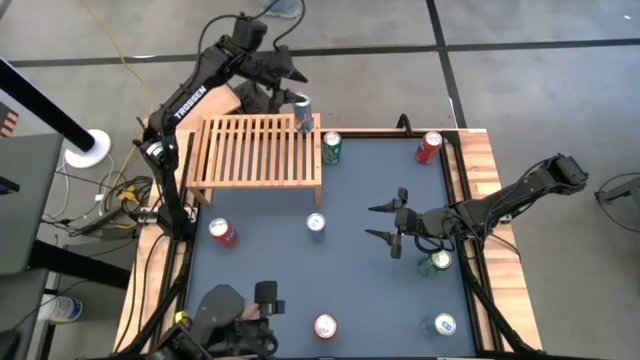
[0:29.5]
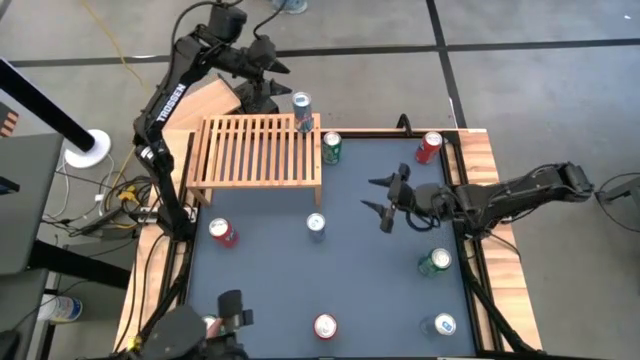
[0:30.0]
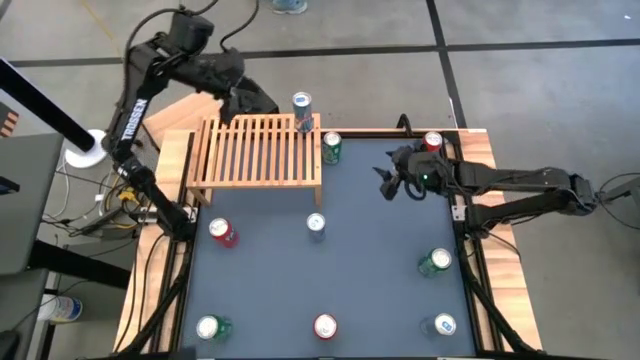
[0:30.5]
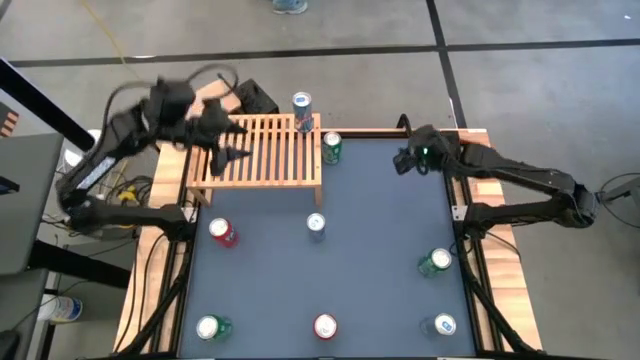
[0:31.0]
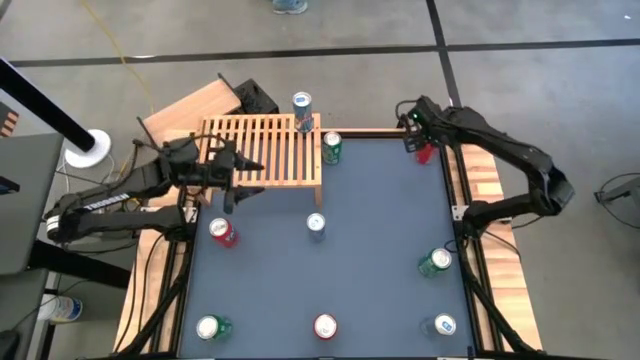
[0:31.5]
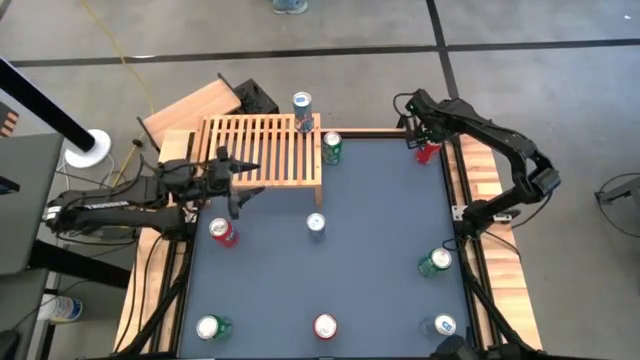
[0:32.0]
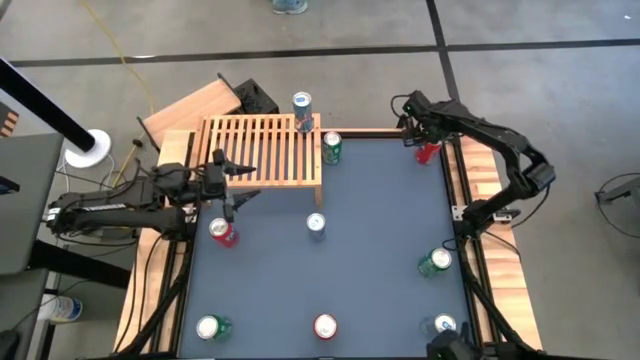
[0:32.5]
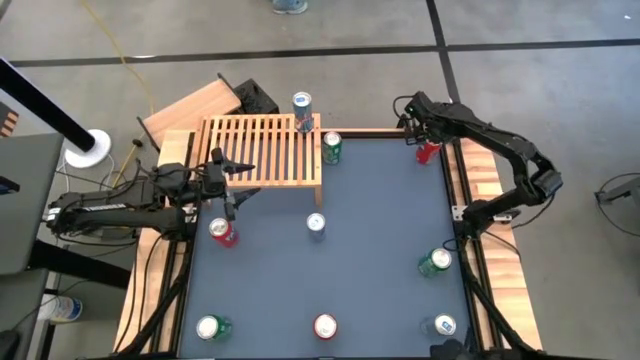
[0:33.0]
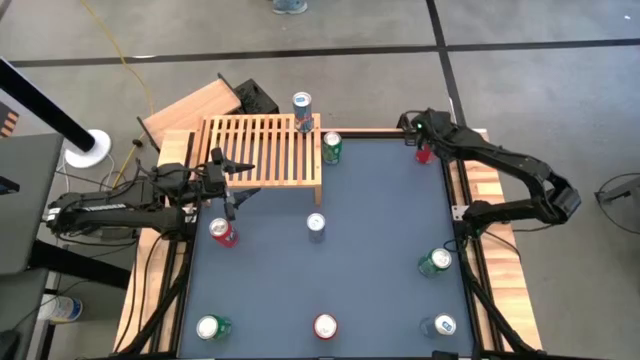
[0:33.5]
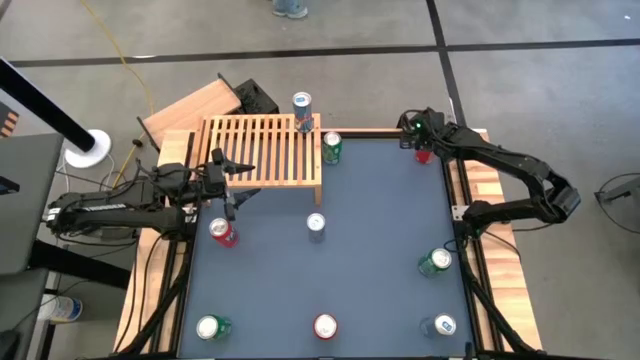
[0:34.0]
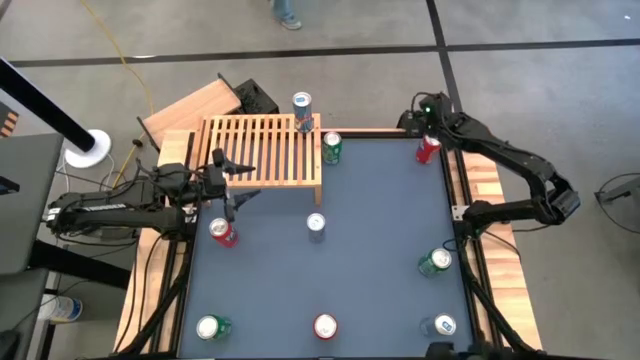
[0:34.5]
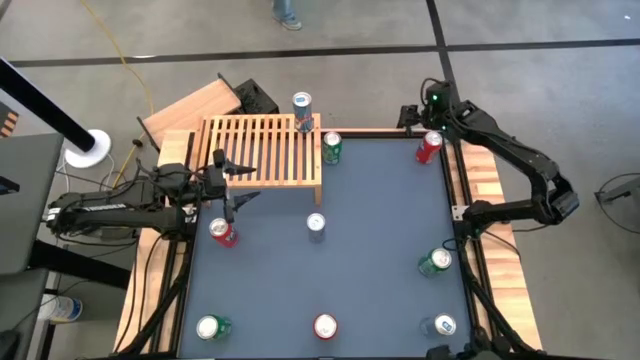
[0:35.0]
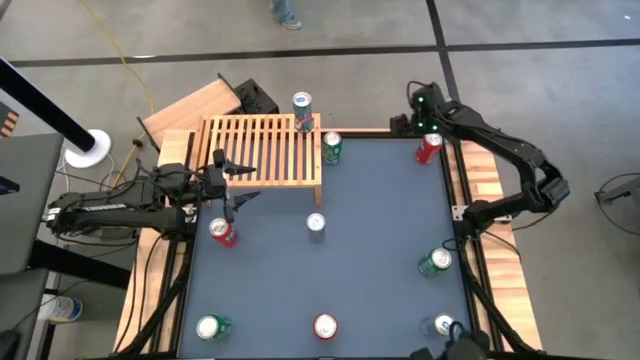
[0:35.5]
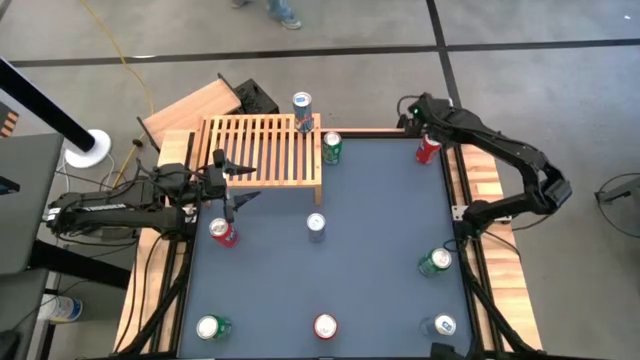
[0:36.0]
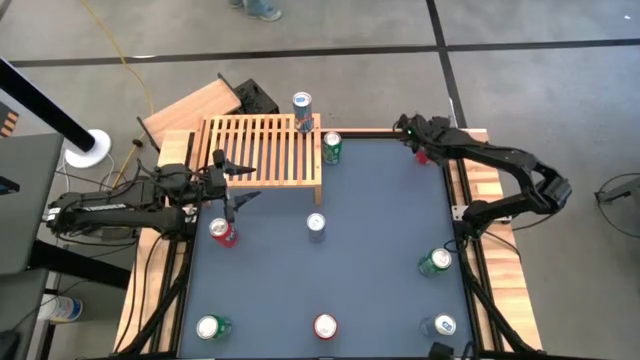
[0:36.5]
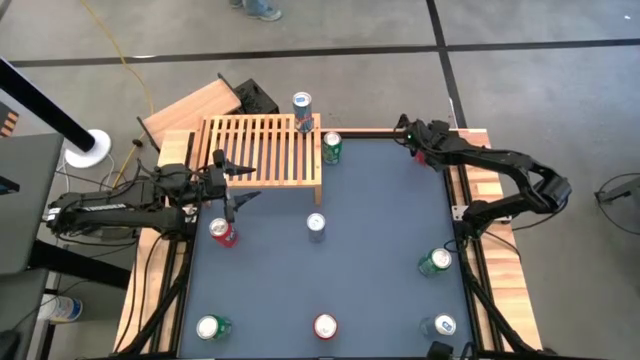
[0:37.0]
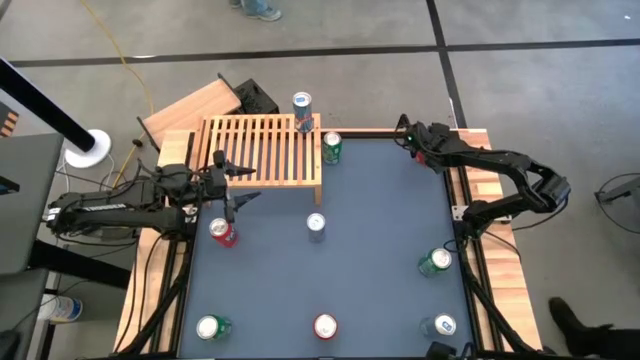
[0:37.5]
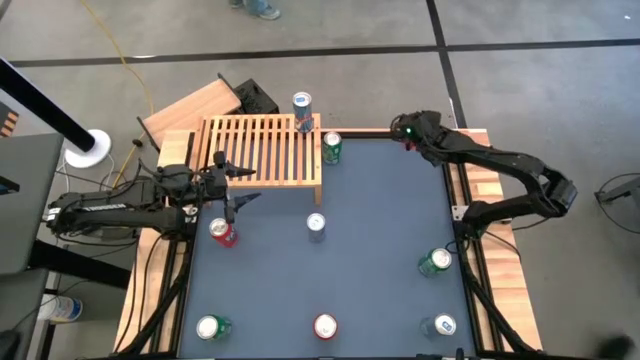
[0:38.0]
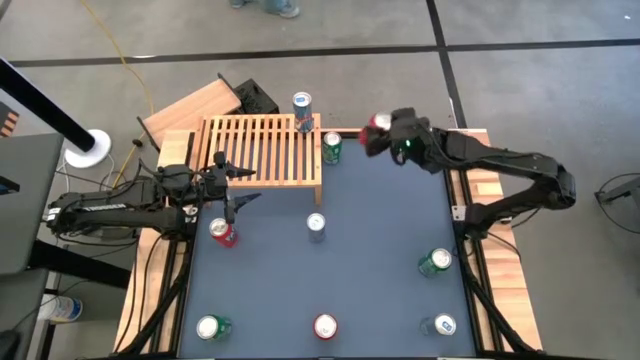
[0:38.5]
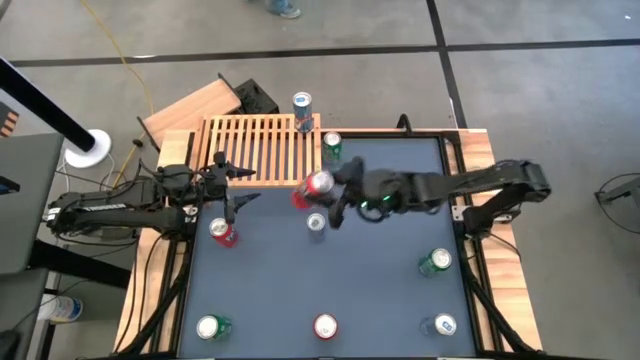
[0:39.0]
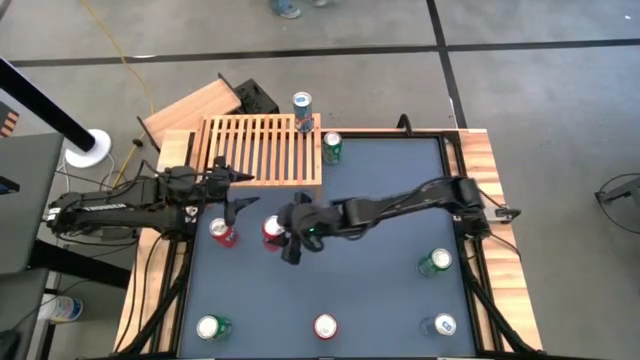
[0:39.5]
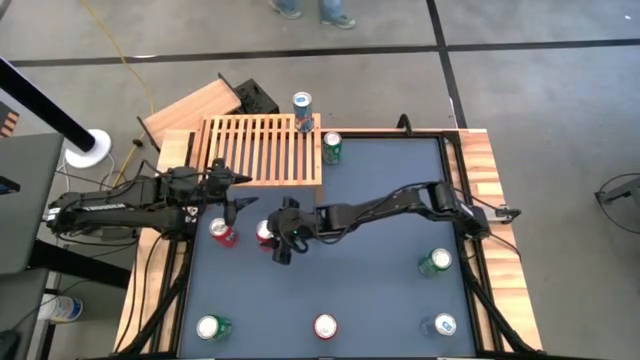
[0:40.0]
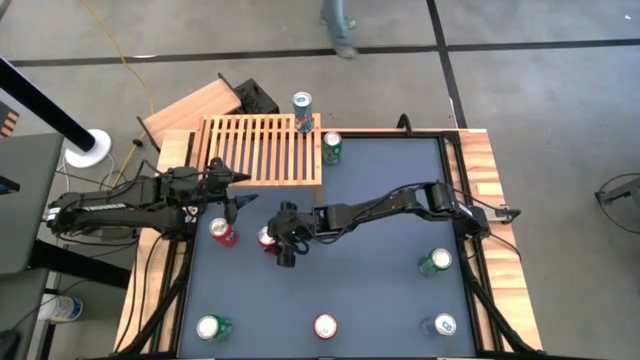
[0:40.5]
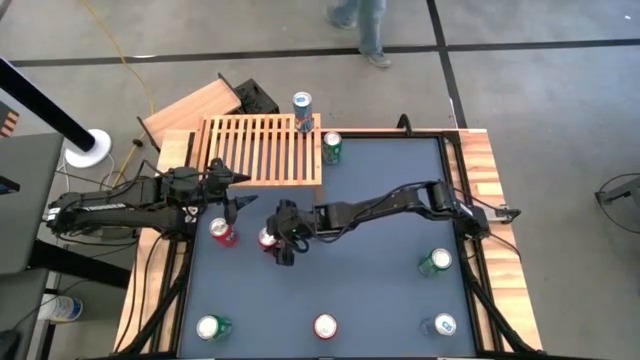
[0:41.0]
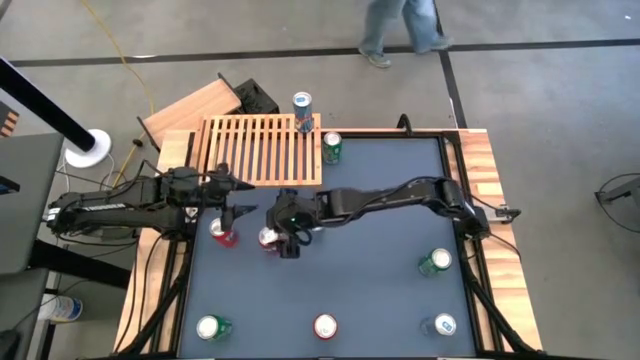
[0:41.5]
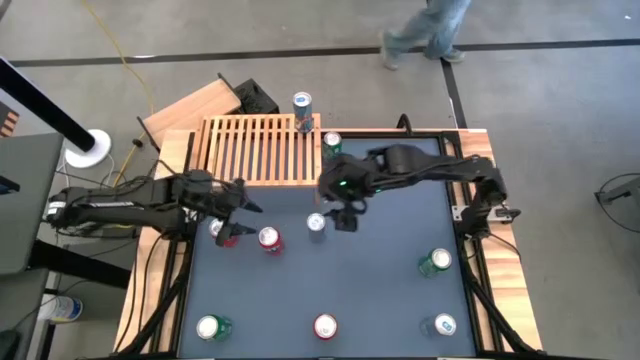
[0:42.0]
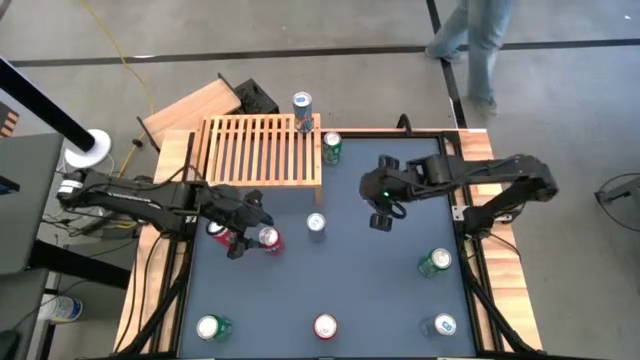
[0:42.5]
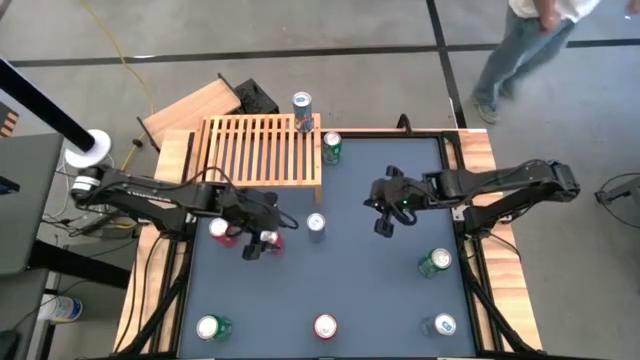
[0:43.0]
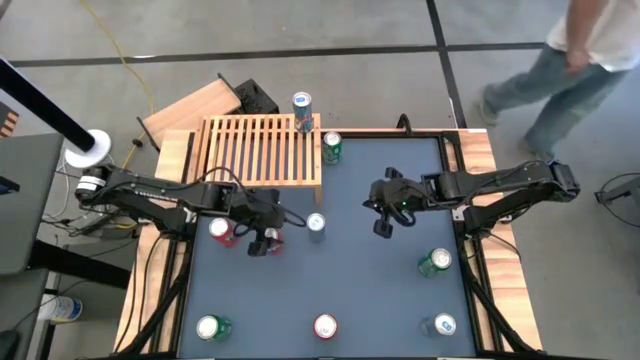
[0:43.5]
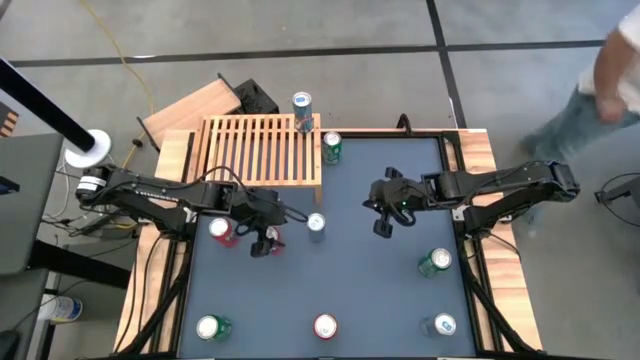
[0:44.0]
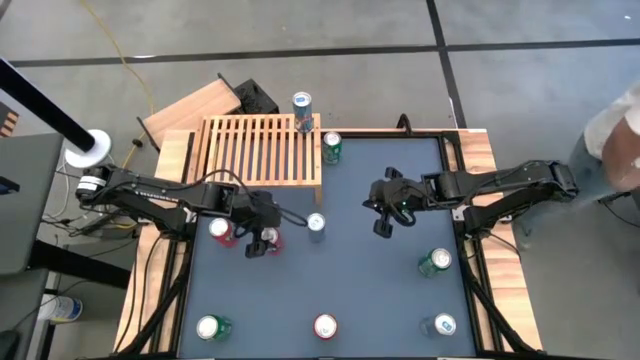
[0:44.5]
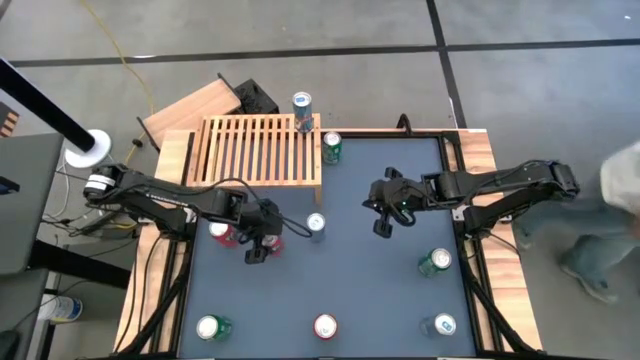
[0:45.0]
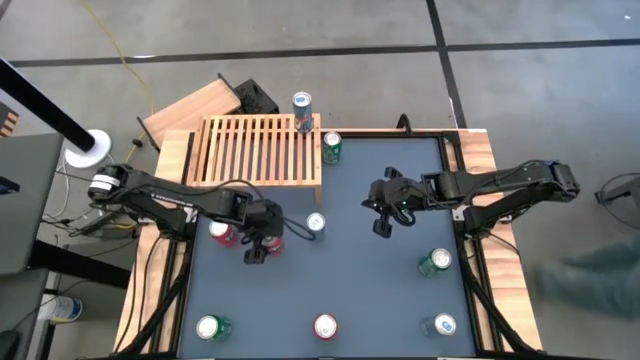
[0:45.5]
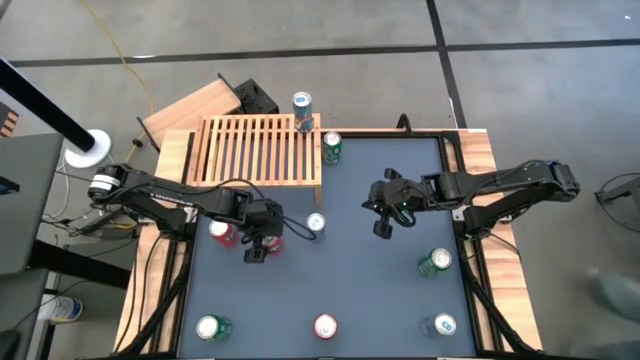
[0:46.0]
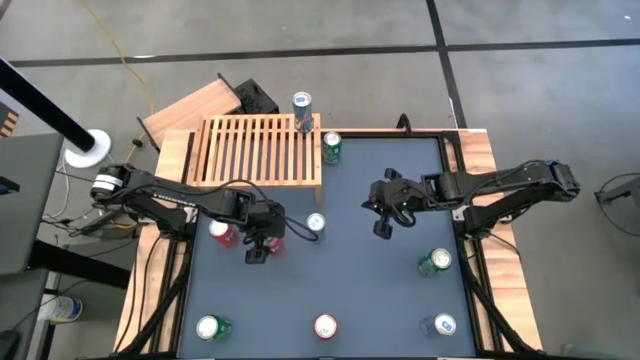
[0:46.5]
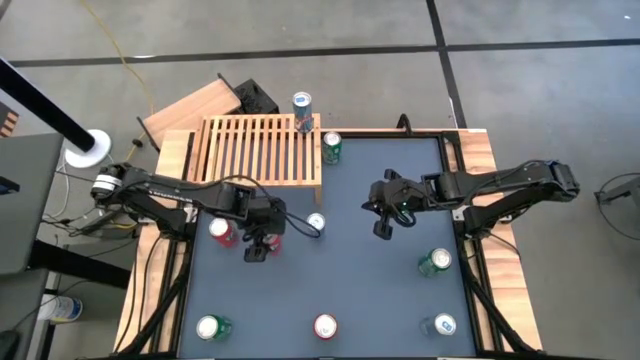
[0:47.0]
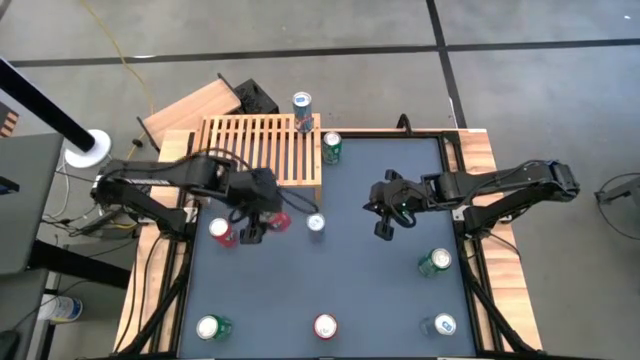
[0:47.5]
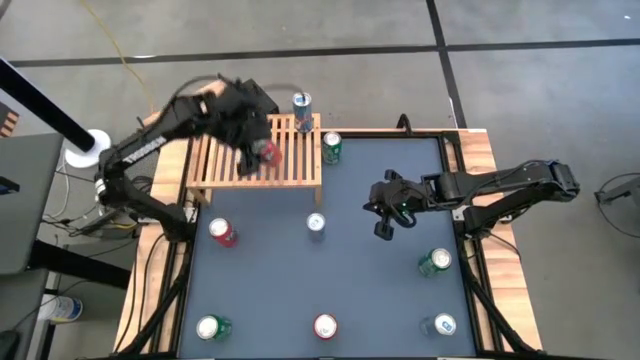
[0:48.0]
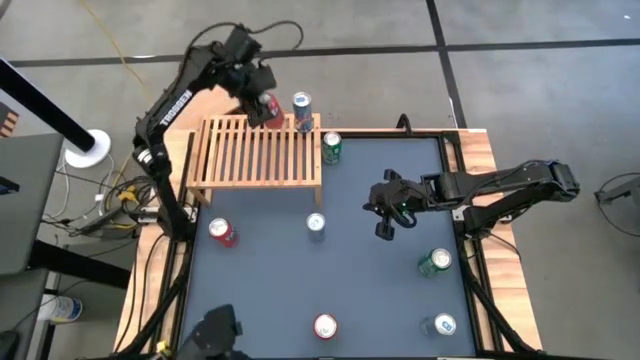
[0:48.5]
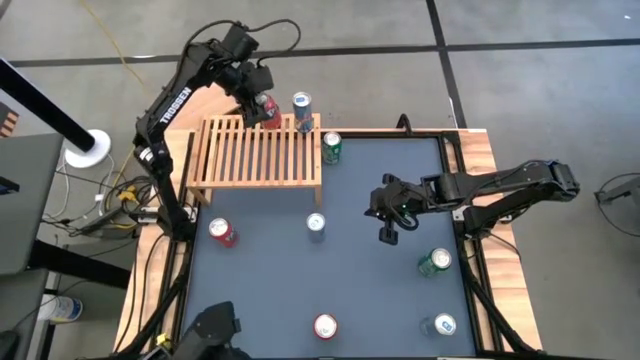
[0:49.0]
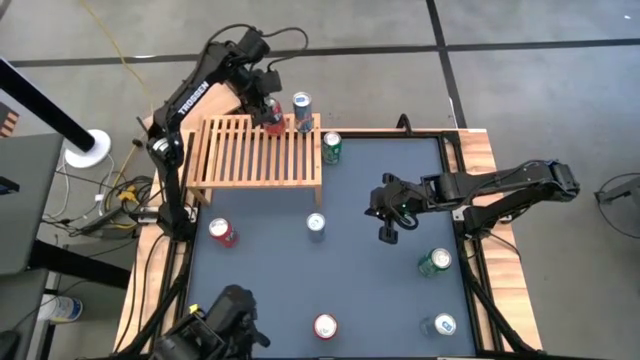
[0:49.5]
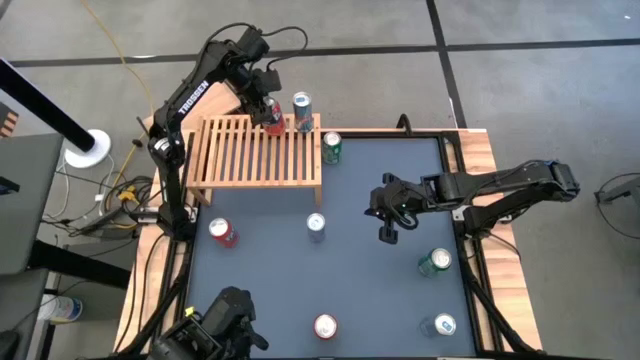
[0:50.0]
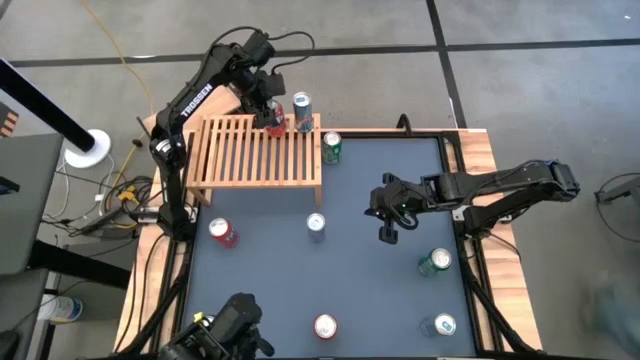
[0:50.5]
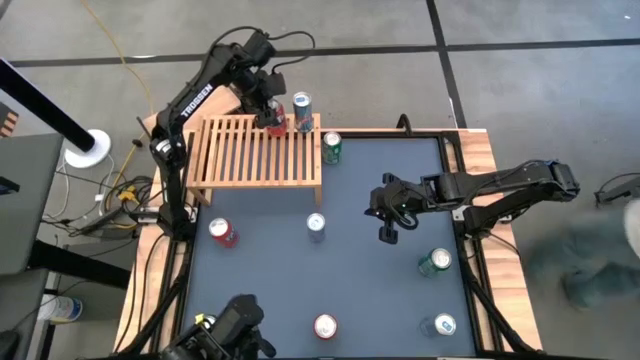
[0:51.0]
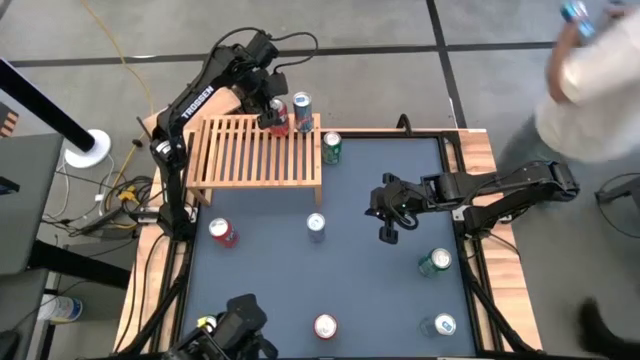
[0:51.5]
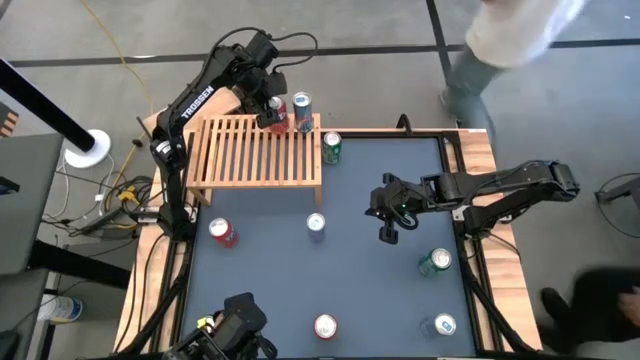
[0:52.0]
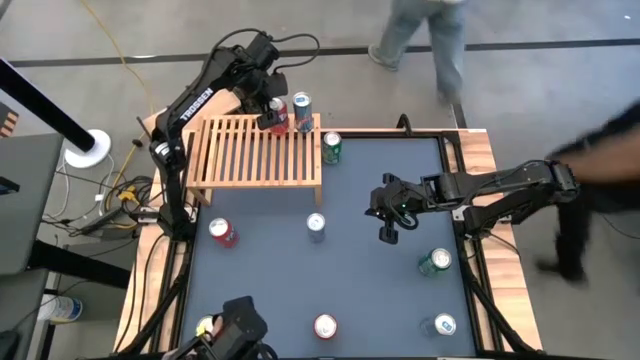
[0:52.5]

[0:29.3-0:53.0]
Task: Place canned beverage on shelf
Put the top right red soda can on the shelf
